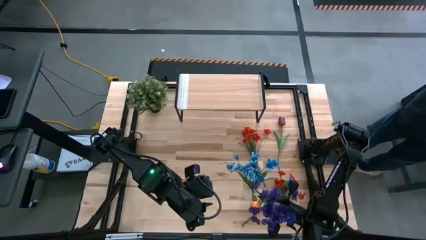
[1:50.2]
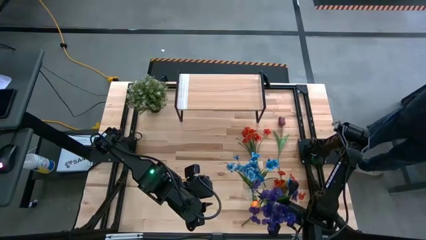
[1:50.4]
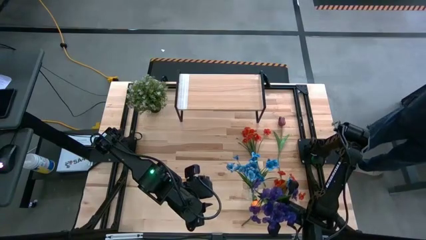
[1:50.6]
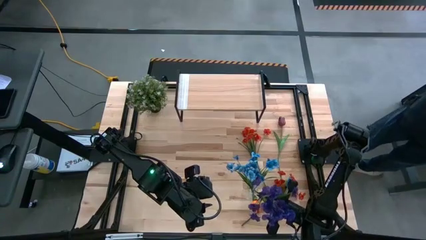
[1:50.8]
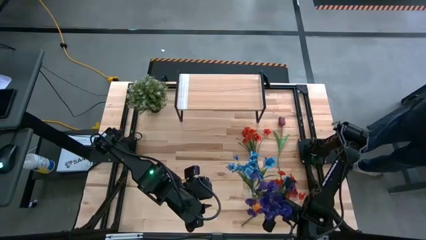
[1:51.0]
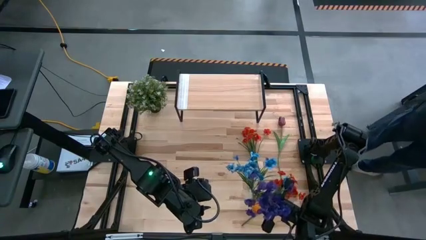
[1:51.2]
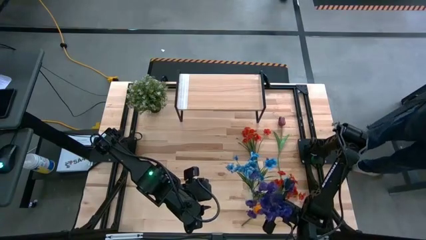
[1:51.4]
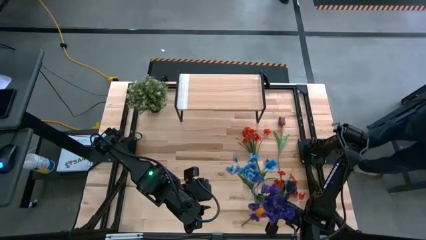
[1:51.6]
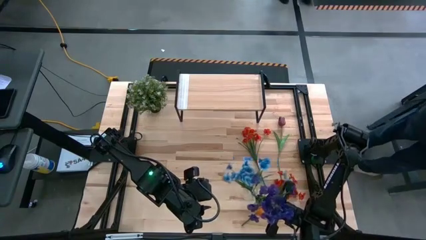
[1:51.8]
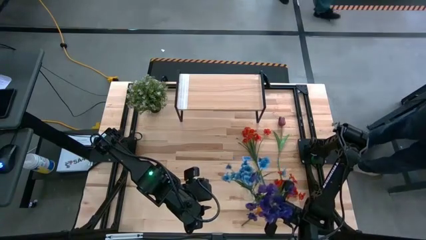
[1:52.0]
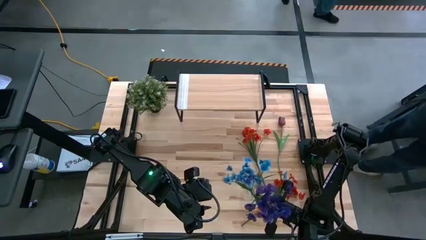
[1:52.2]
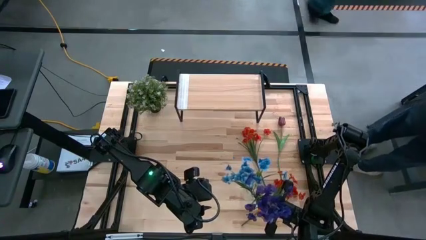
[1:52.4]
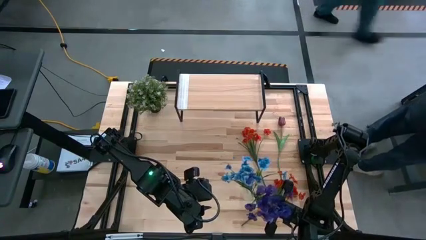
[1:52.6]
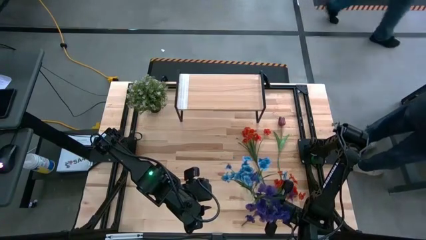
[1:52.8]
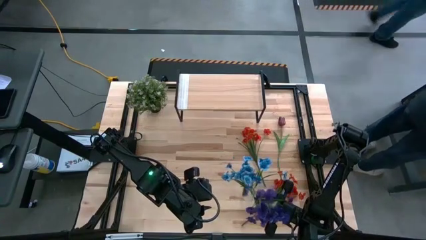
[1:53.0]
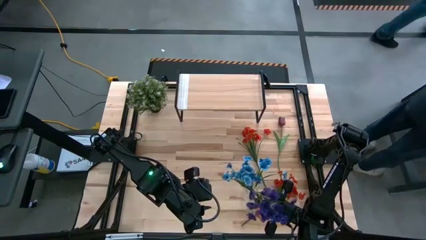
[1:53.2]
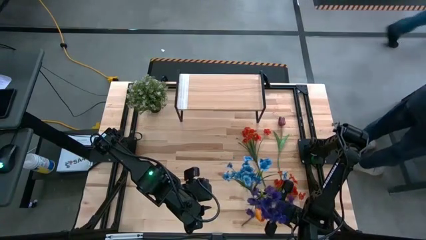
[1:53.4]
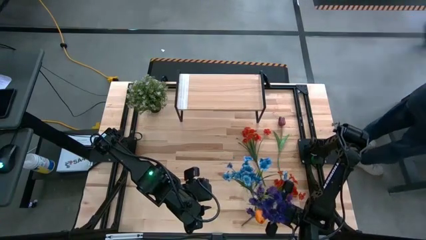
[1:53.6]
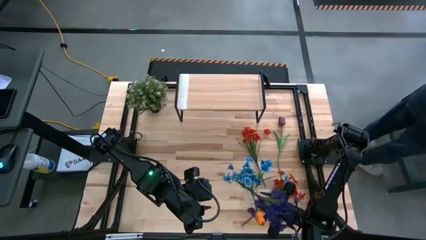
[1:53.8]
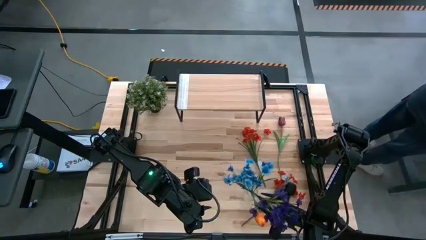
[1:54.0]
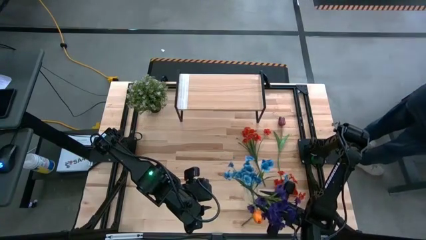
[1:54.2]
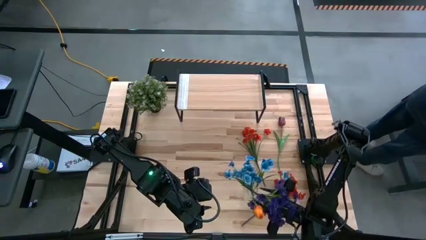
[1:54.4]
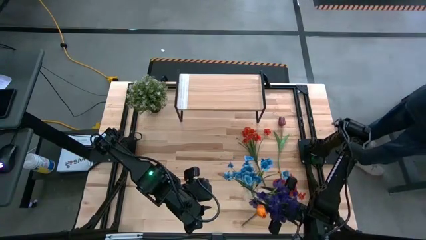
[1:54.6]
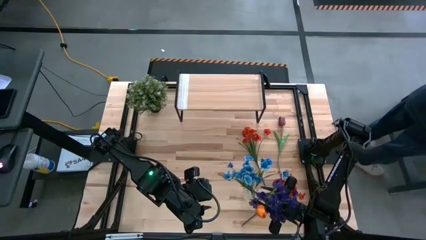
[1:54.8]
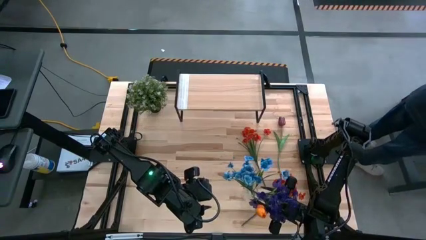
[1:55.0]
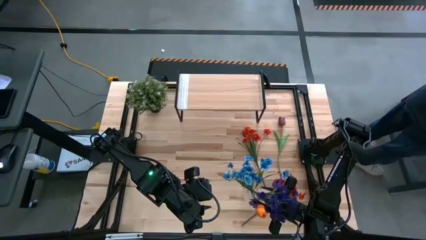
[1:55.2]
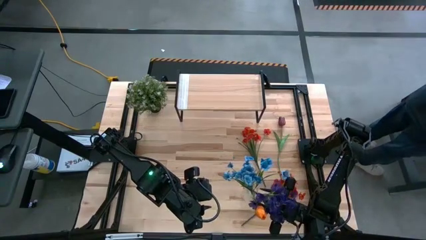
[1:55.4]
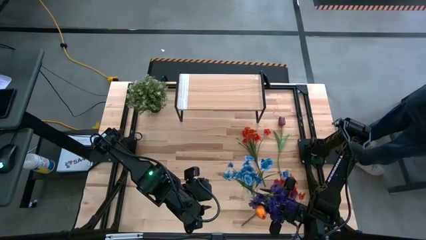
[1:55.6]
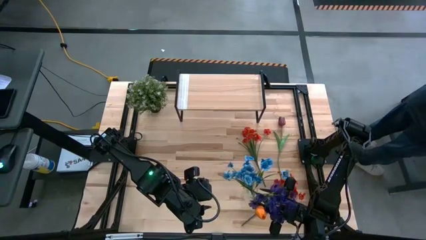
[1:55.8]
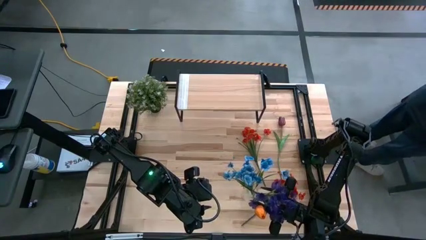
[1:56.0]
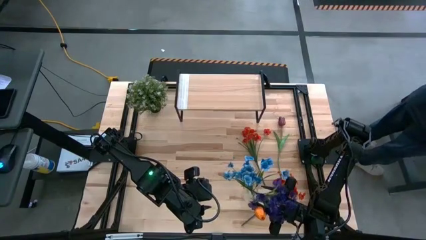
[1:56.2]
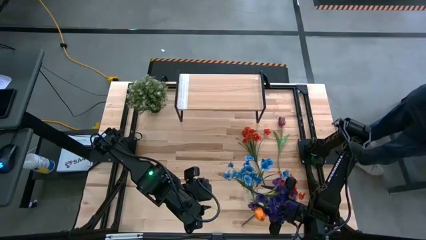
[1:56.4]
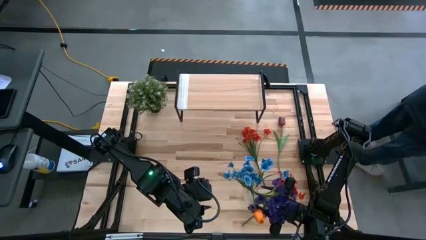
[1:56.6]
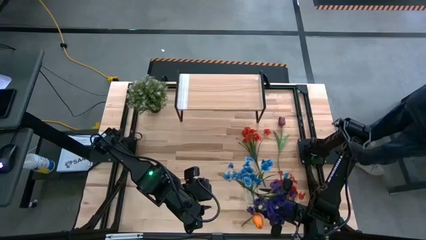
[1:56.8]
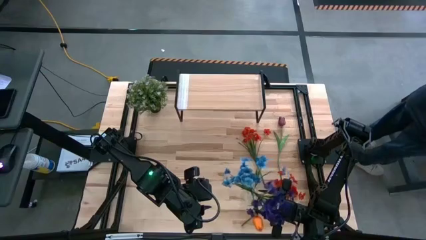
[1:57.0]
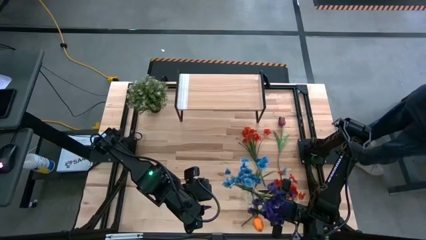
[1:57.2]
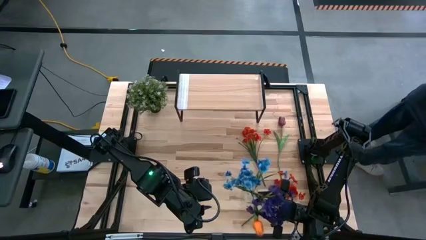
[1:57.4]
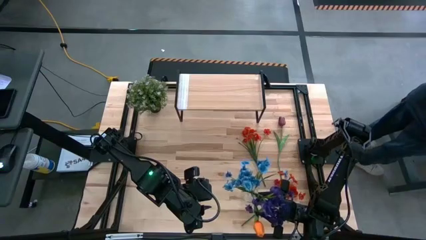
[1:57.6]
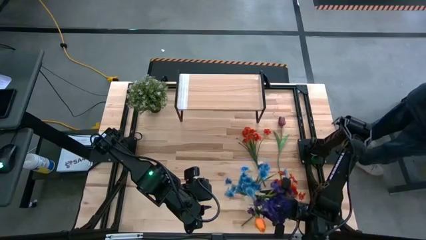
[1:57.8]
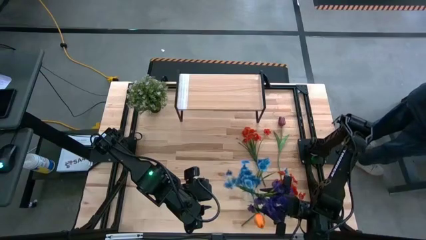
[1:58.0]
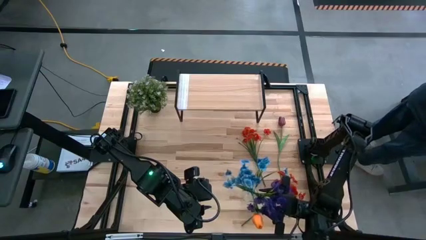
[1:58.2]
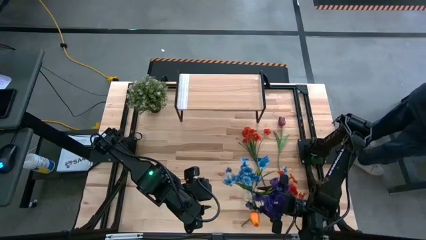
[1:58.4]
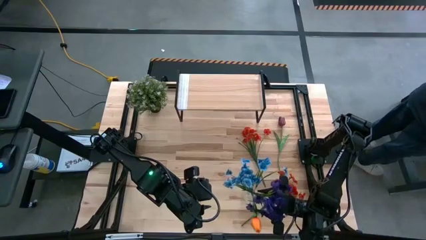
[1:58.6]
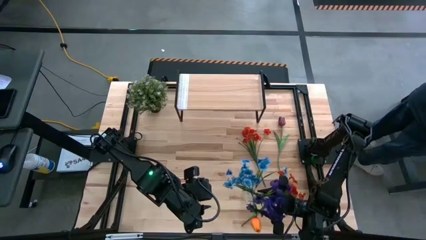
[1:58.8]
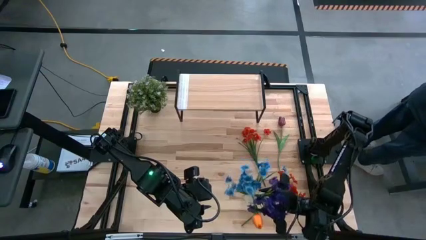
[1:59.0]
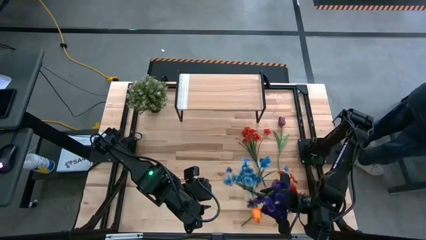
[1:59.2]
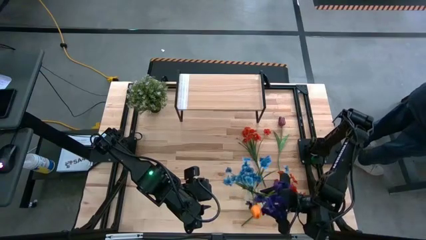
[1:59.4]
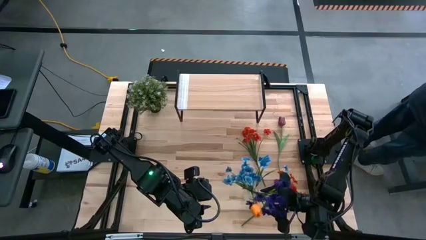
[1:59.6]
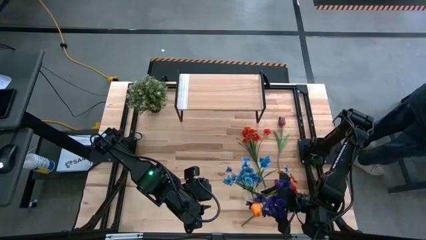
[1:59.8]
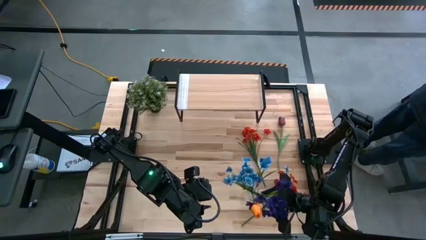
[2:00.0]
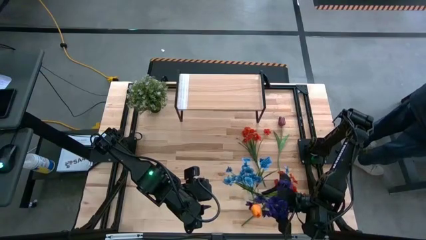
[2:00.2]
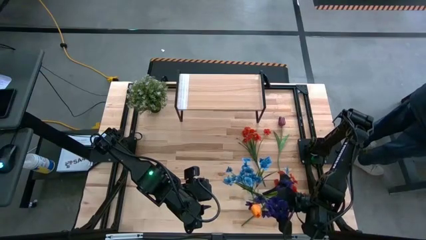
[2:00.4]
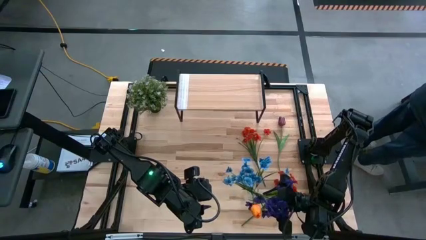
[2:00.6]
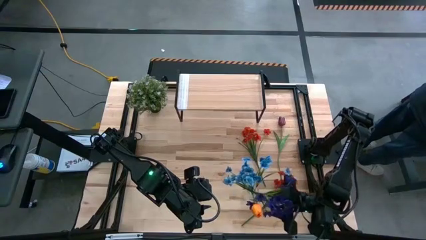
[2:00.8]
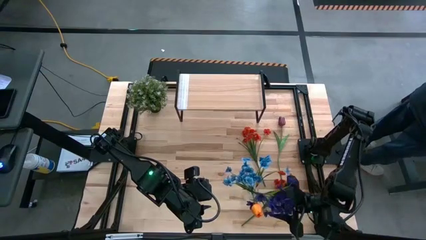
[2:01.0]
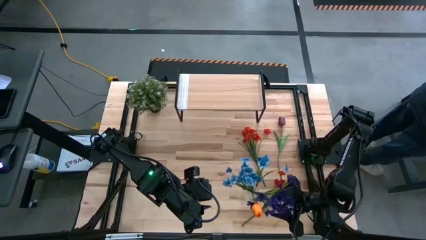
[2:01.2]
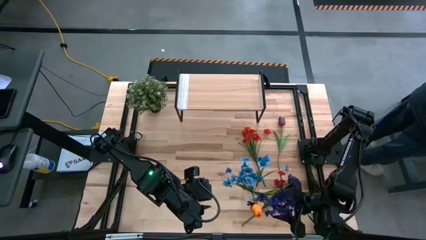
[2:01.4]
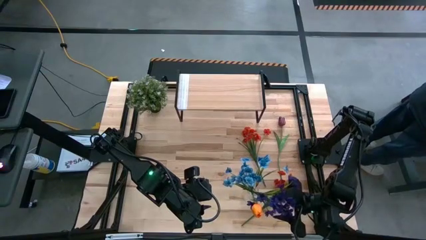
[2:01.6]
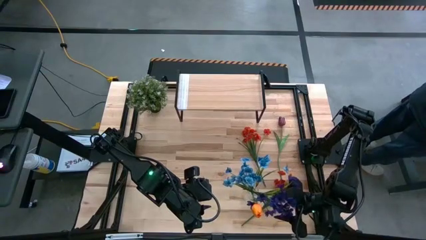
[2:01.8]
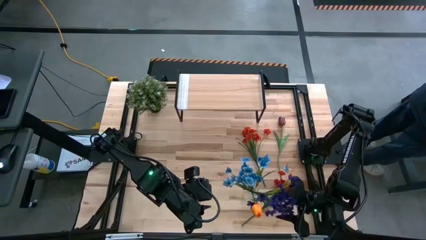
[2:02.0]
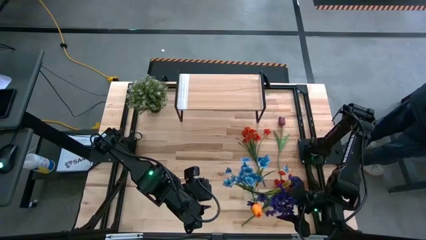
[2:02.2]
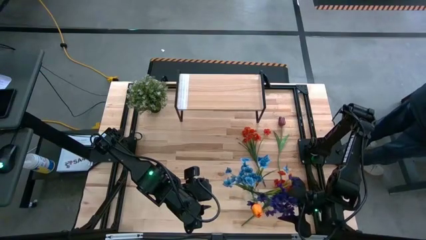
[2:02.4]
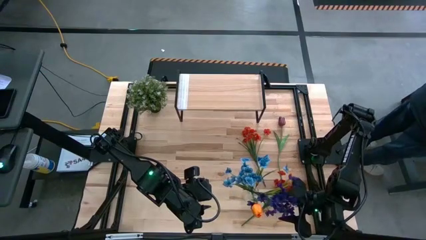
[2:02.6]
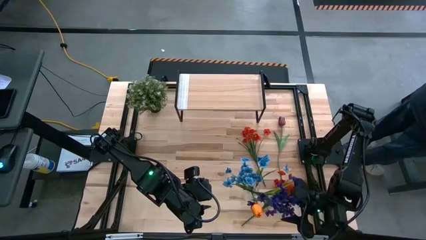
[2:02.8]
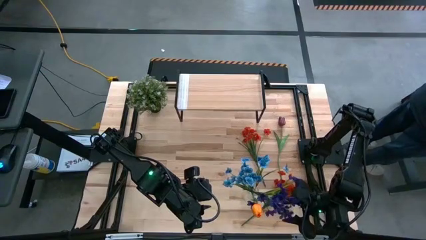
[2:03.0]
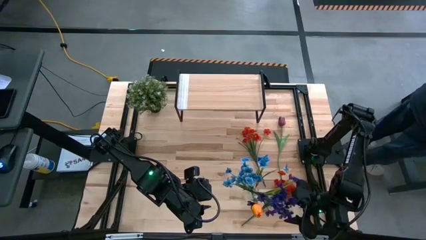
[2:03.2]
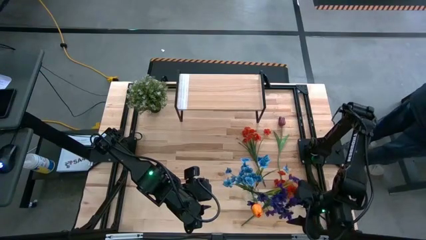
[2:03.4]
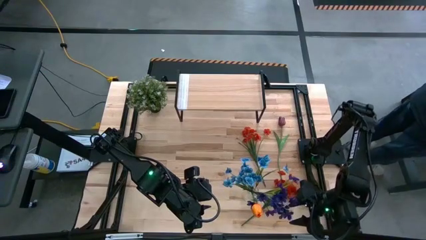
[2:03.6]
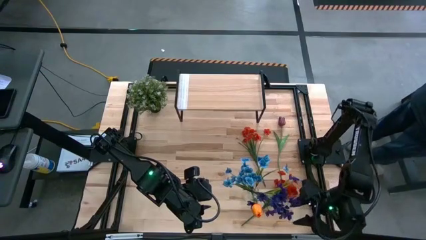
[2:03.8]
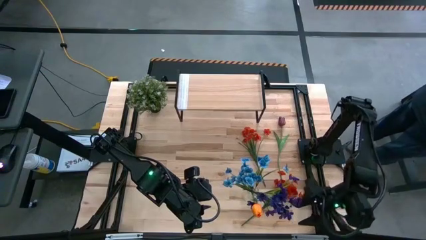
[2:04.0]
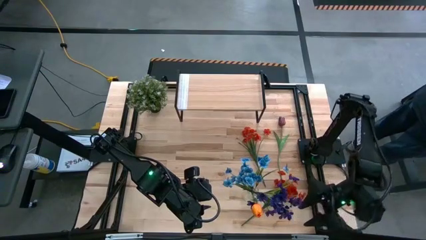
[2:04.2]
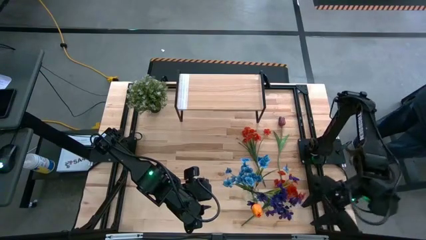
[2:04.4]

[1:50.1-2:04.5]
Task: Pick and place flowers into a vace then onto a shelf
Put the violet flowers into the right transparent vase
